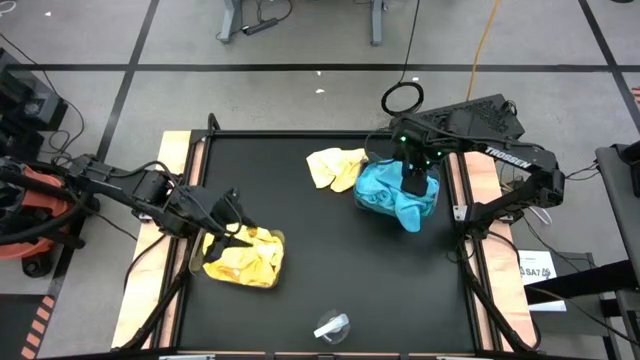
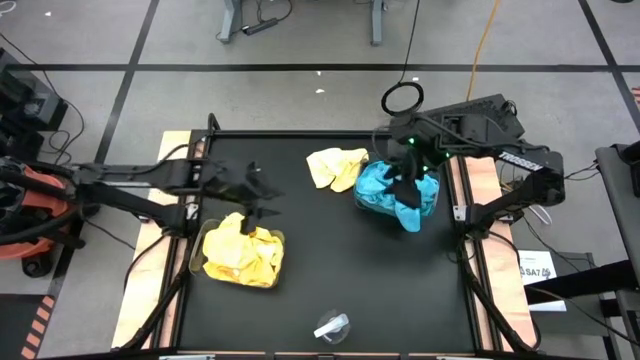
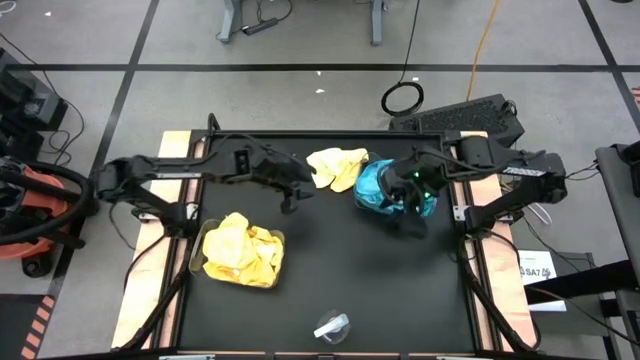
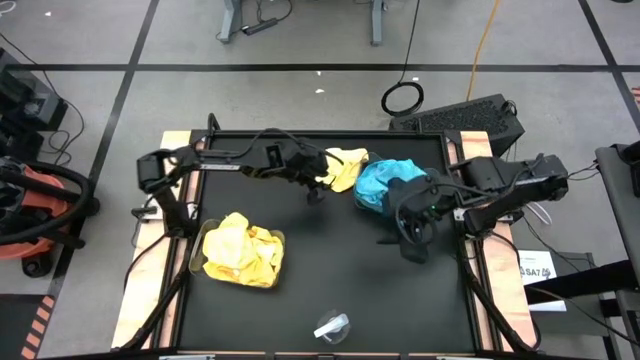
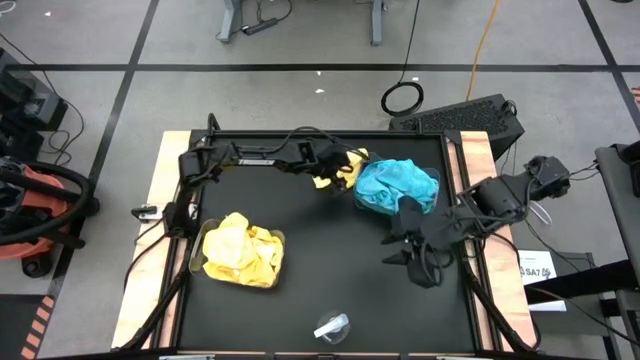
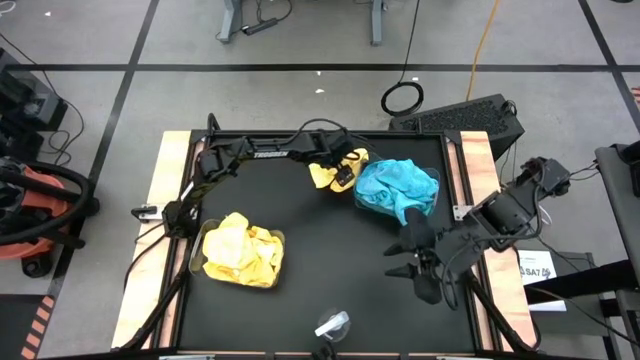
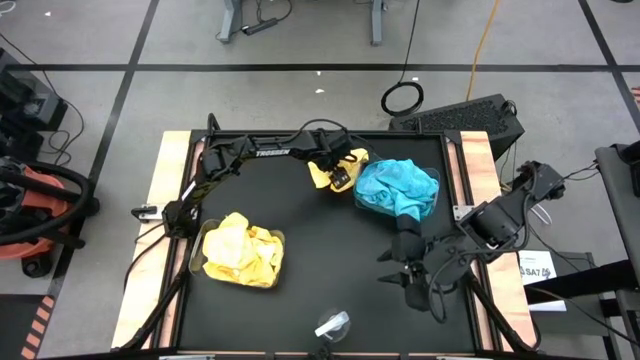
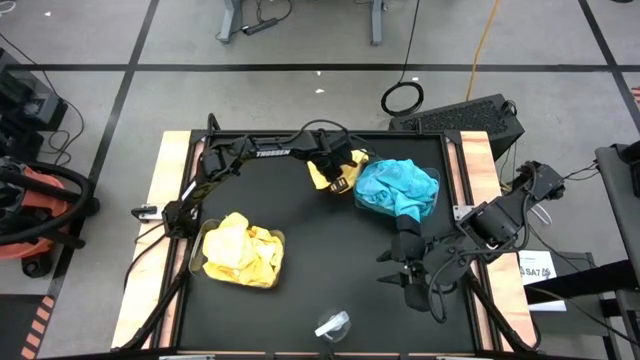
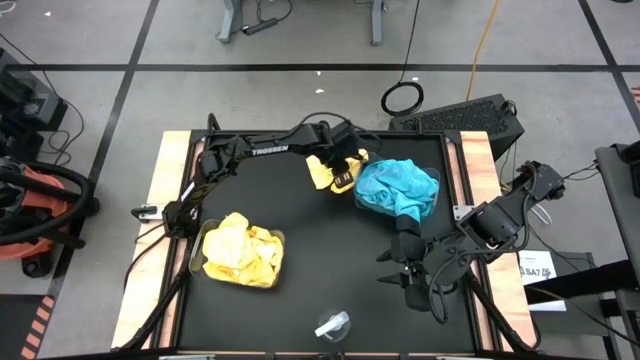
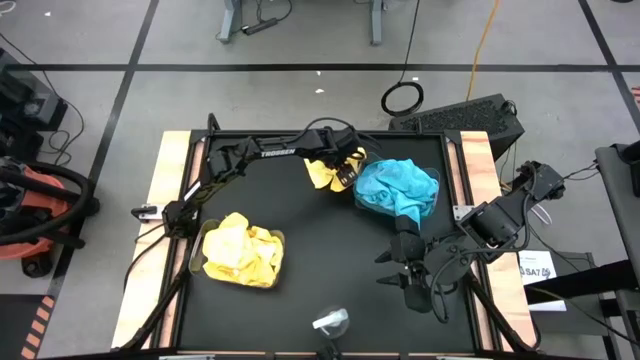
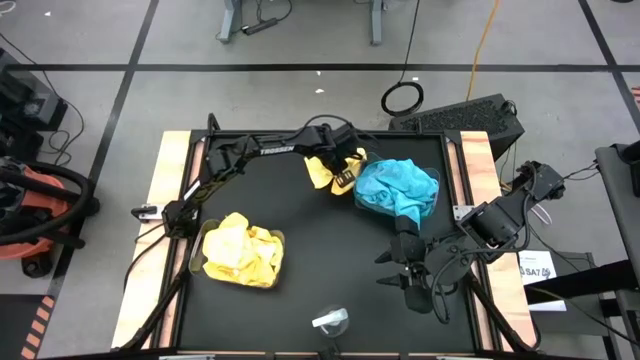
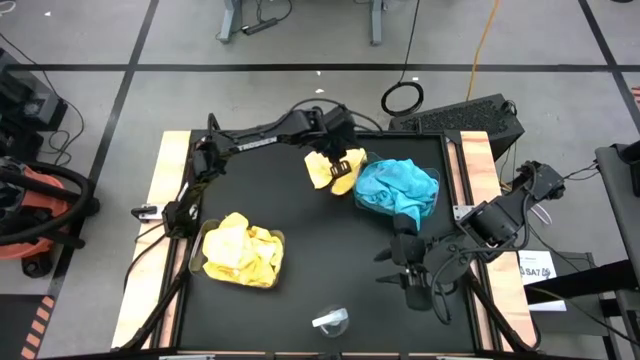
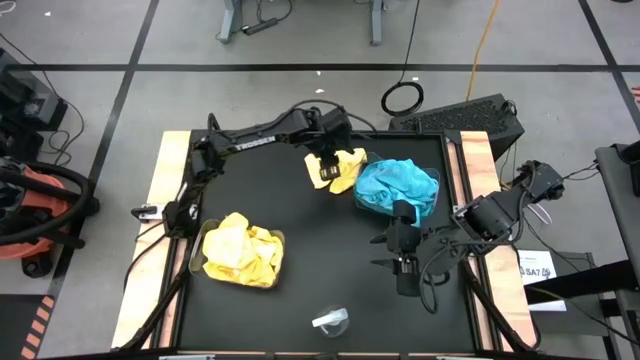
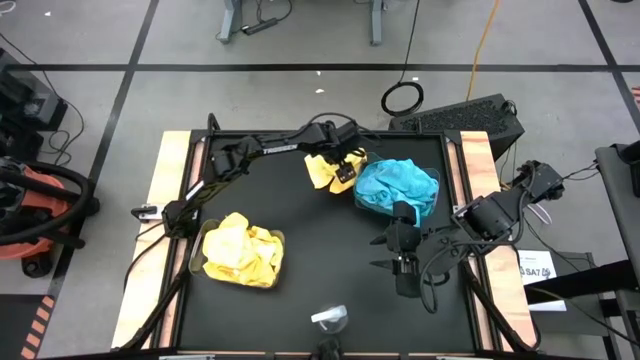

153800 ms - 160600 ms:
Task: Sort microfiber towel by color & place in baskets
Put the yellow microfiber towel into the bottom transparent bin

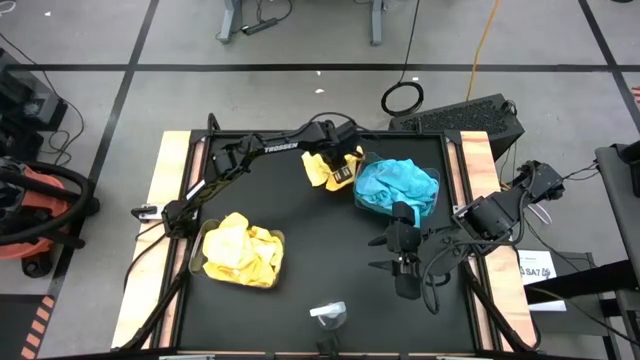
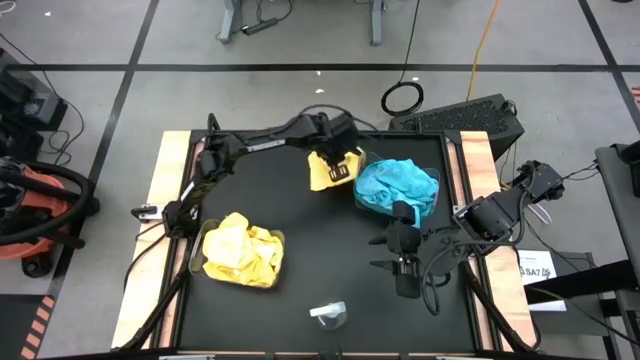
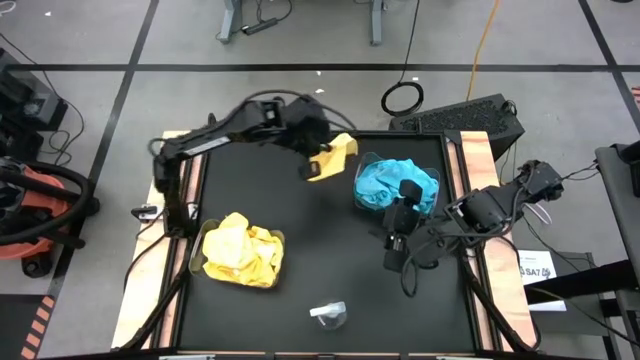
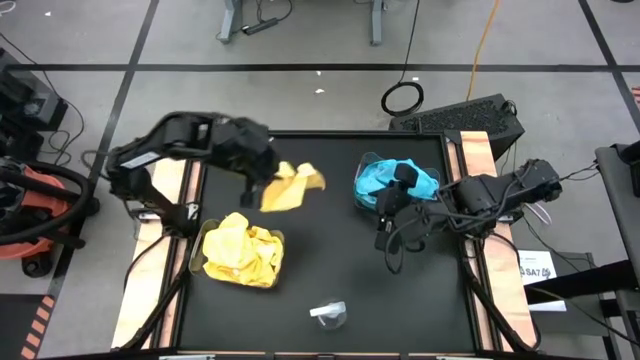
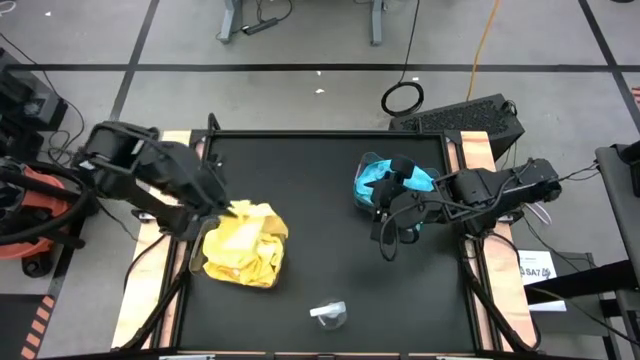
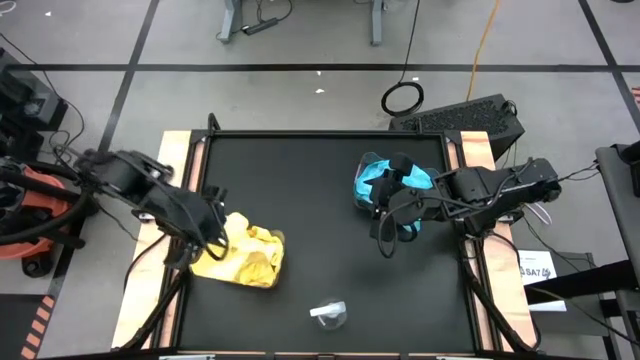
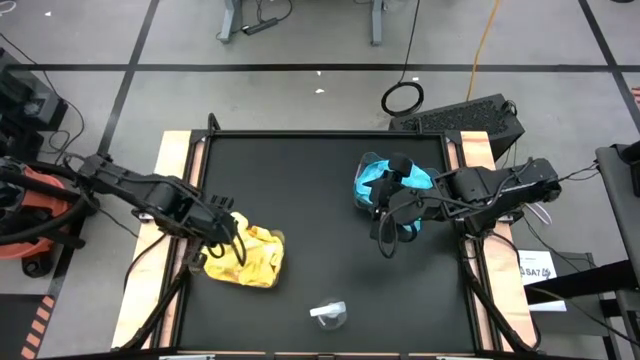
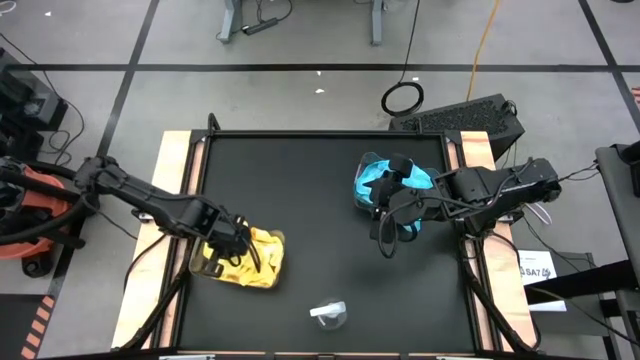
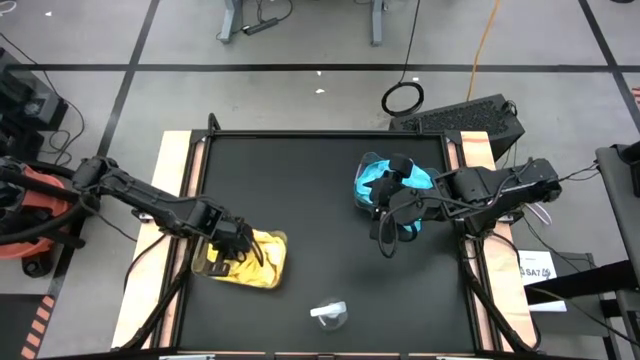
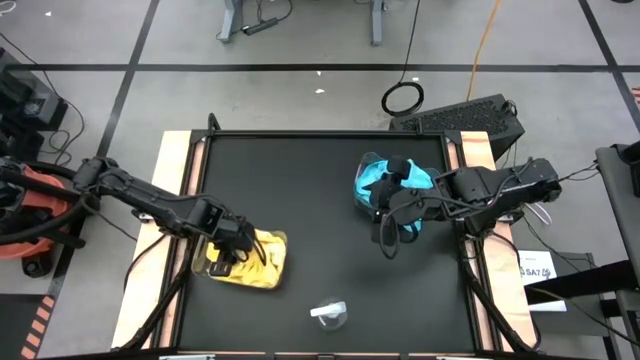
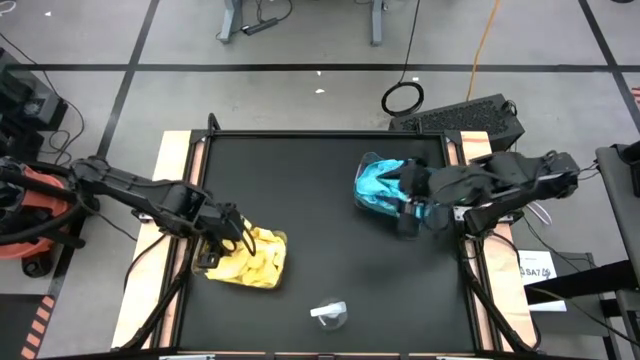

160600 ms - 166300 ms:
Put the yellow microfiber towel into the bottom transparent bin

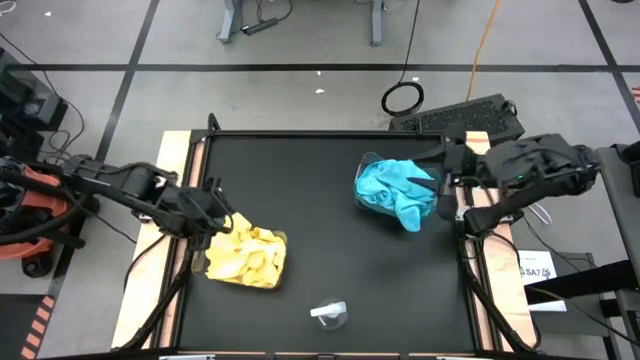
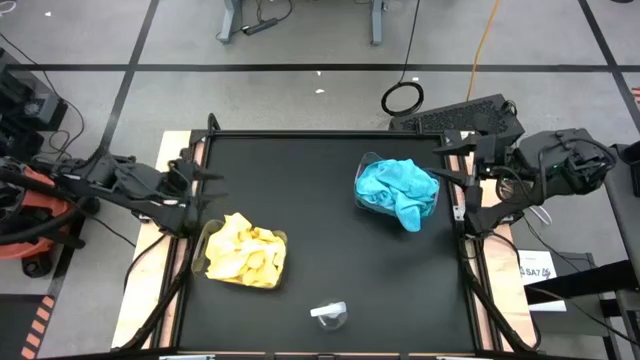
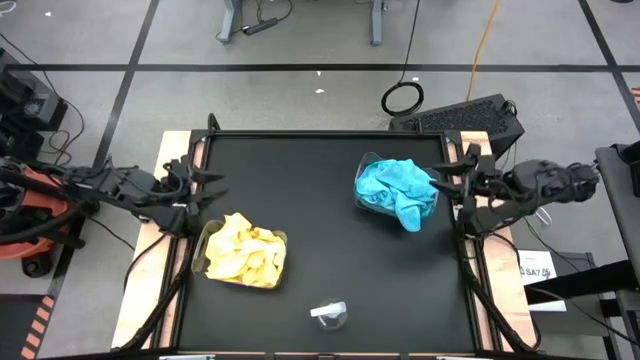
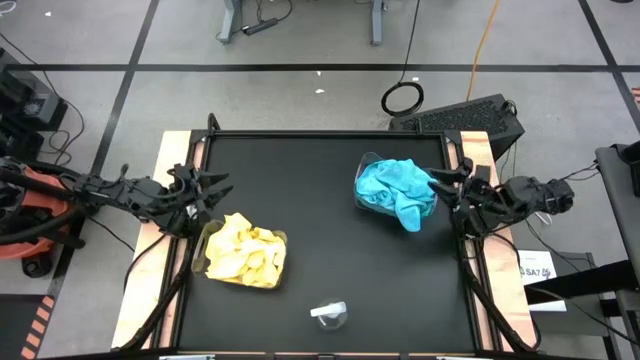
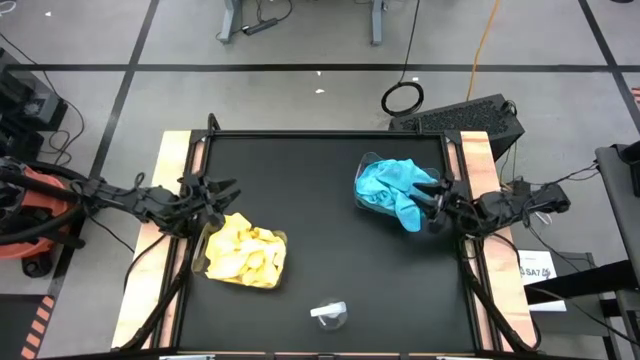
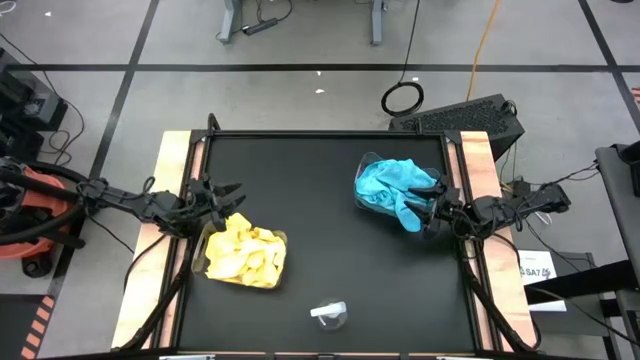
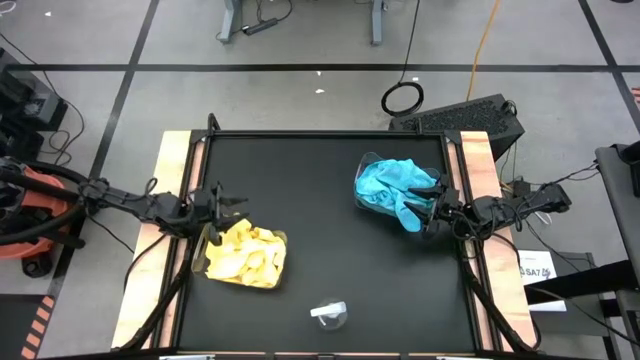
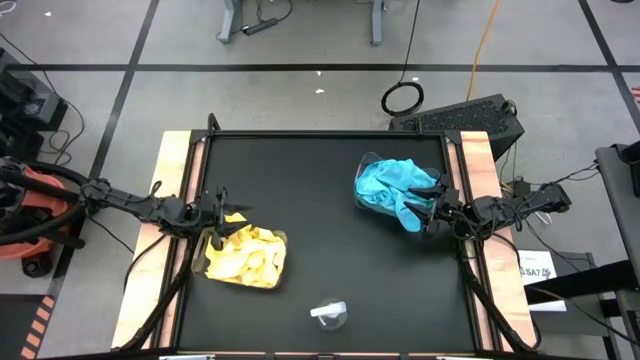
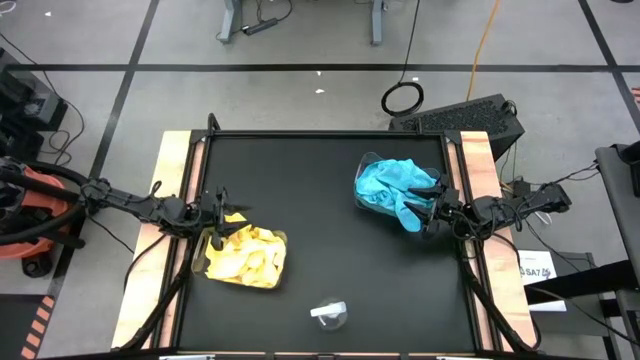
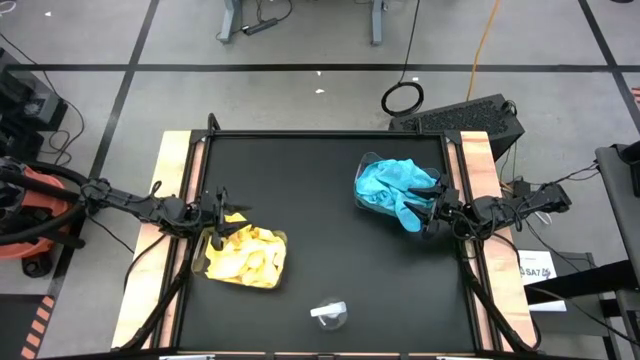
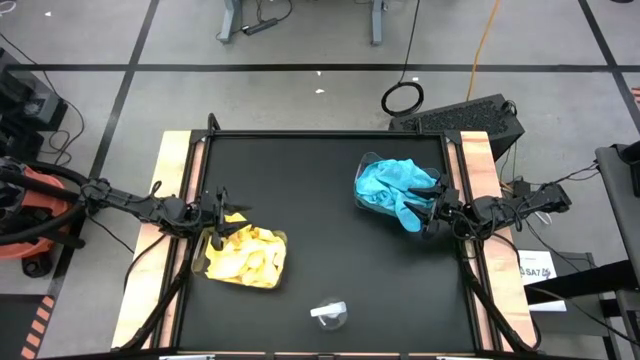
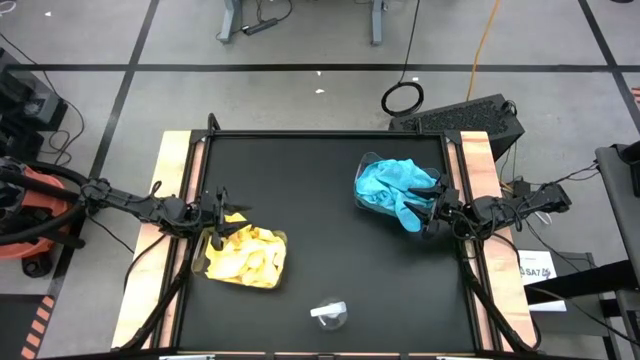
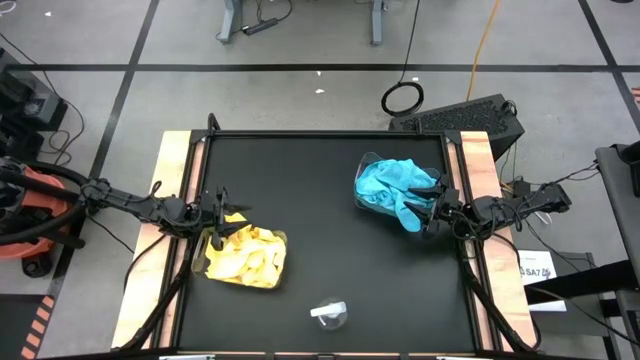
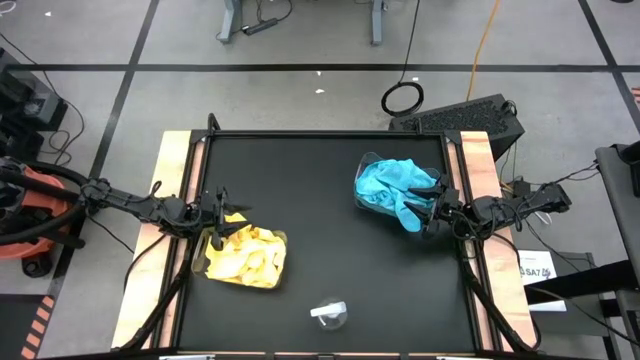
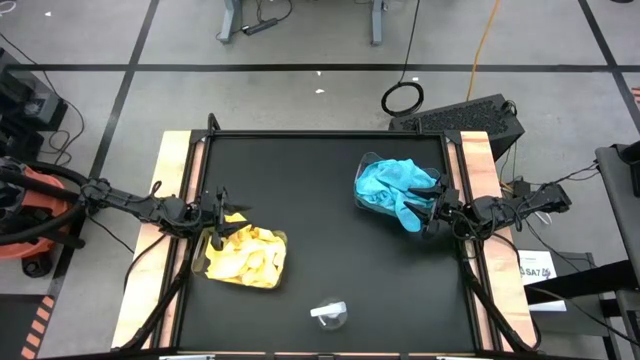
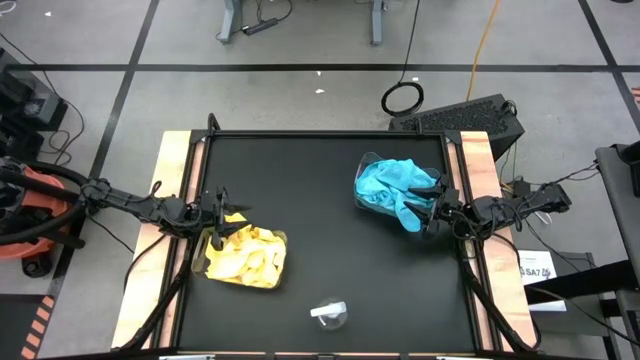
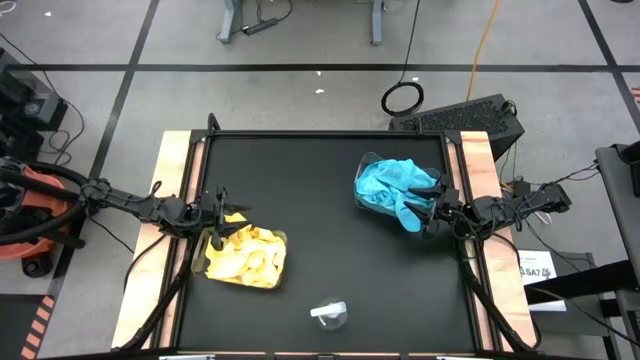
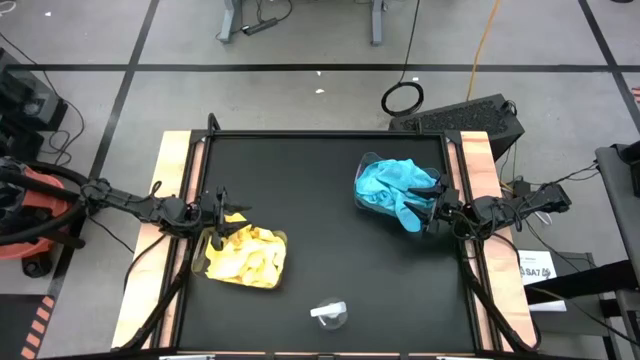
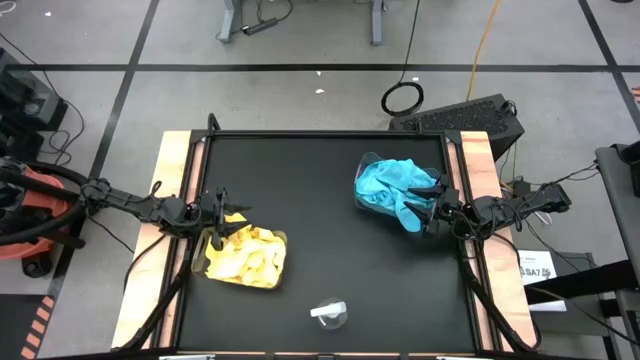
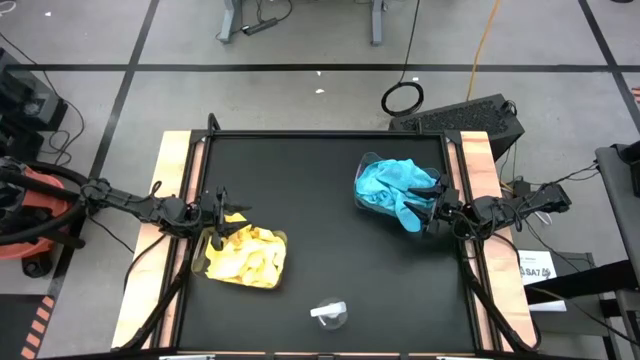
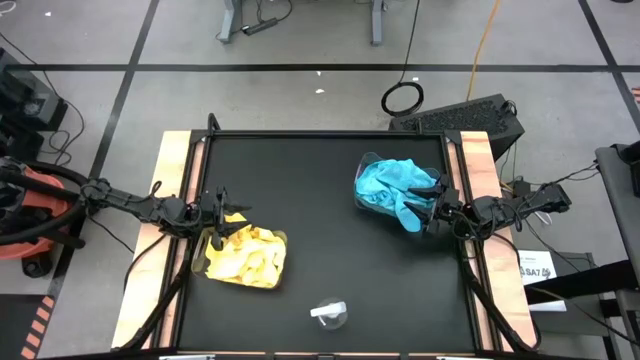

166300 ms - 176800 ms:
Return to Home Position
